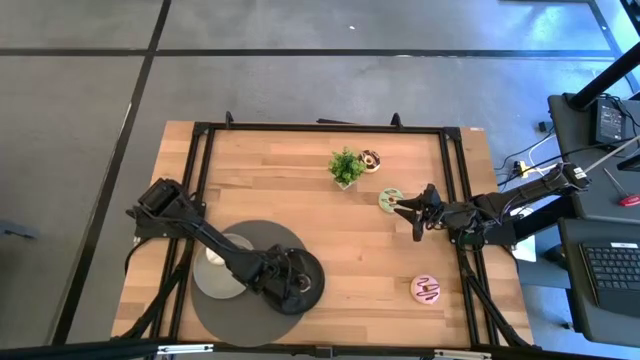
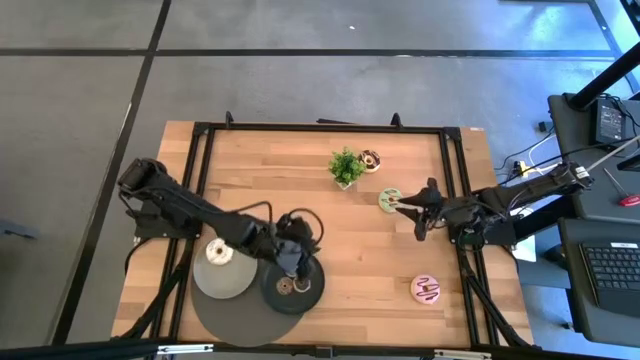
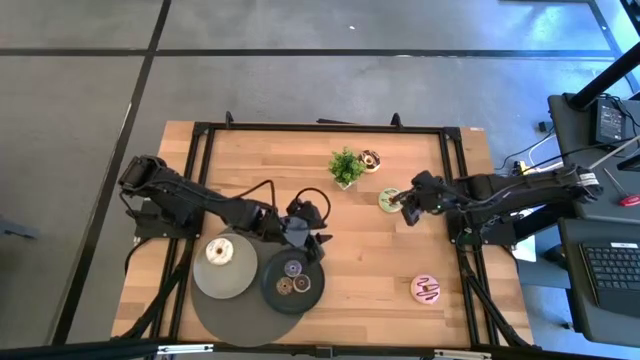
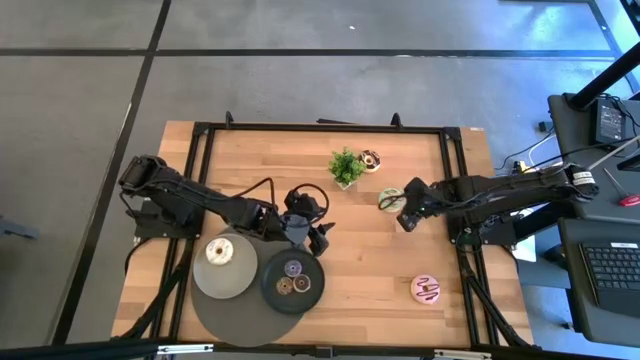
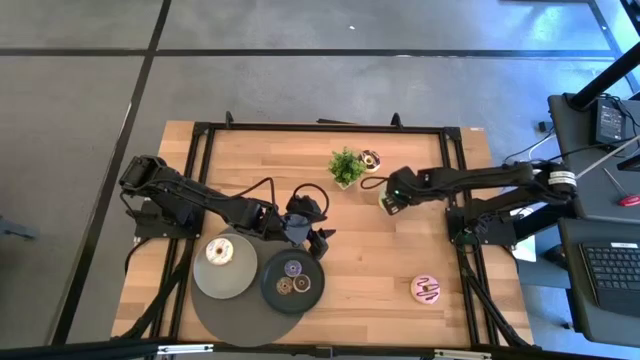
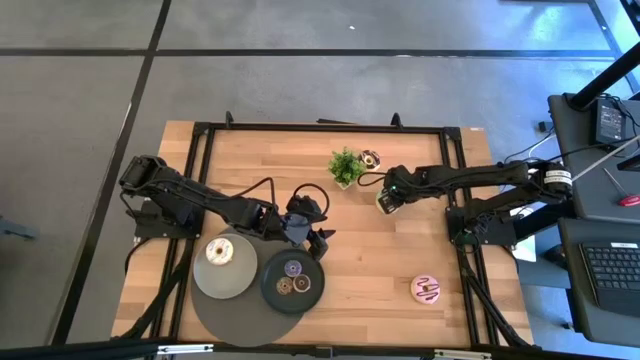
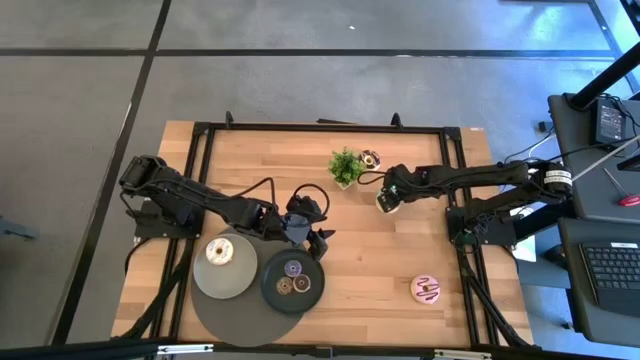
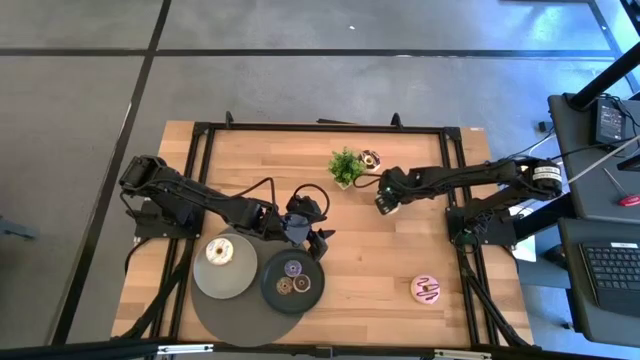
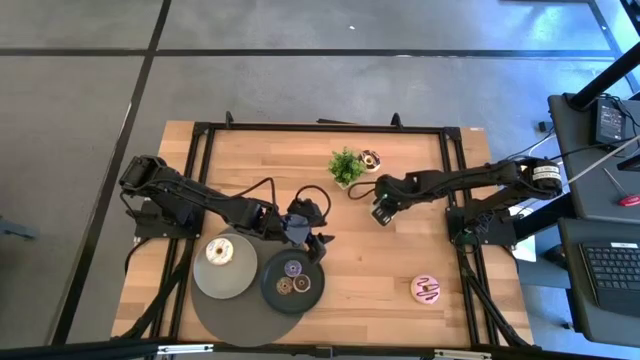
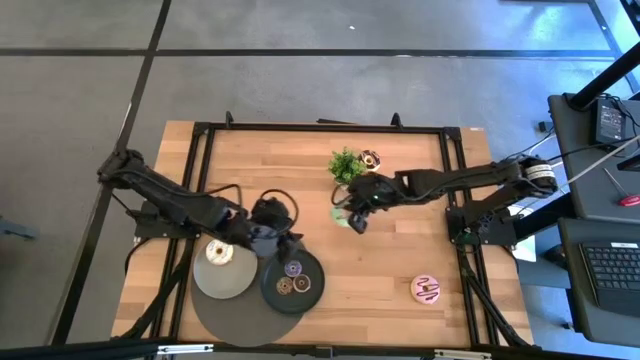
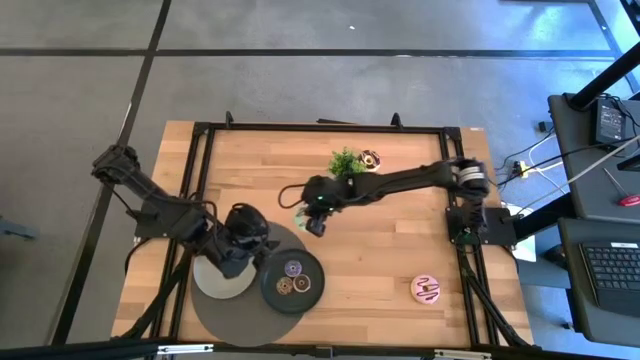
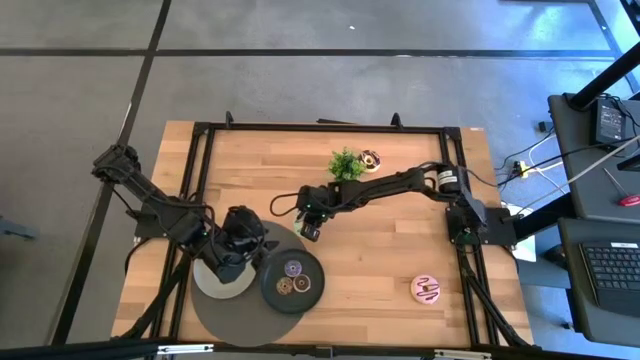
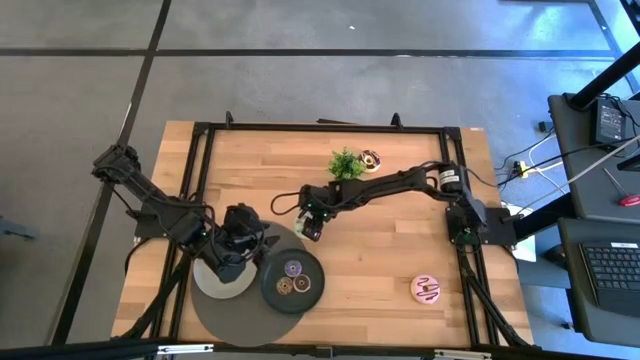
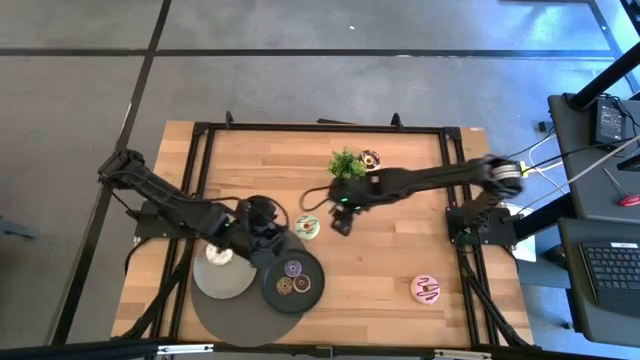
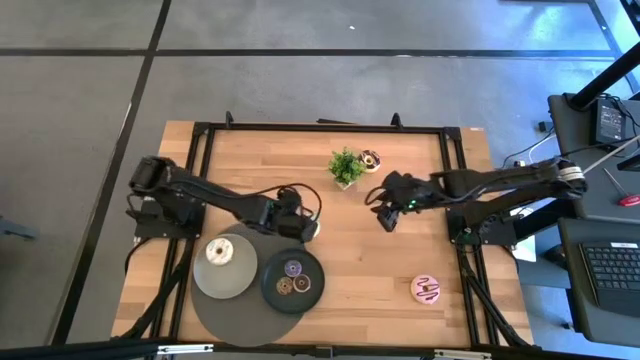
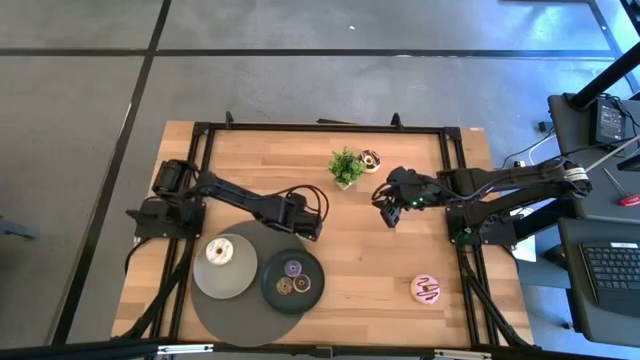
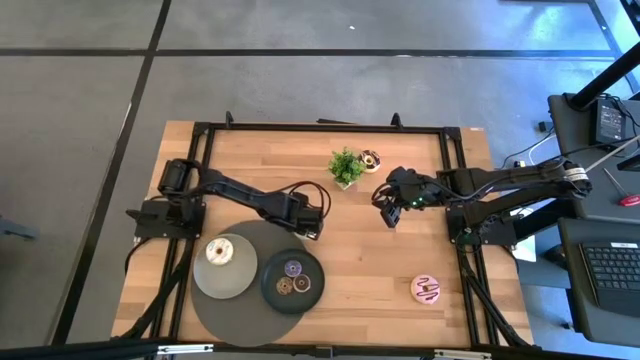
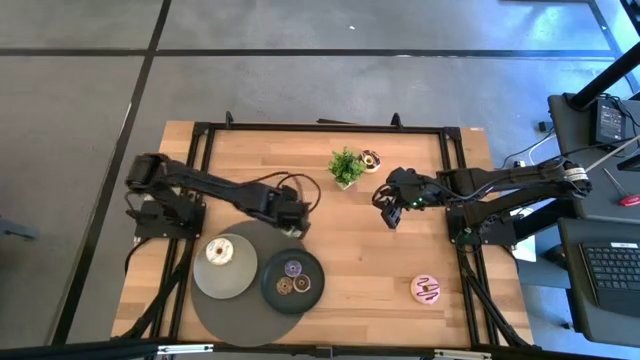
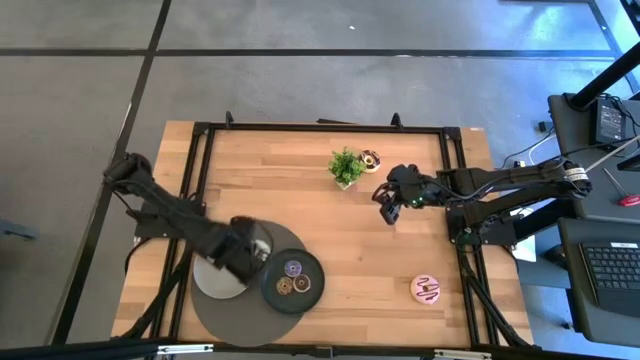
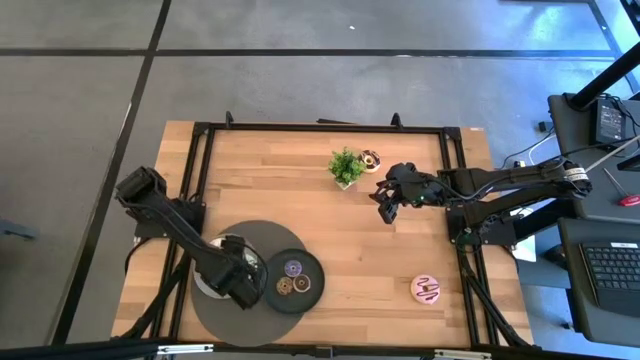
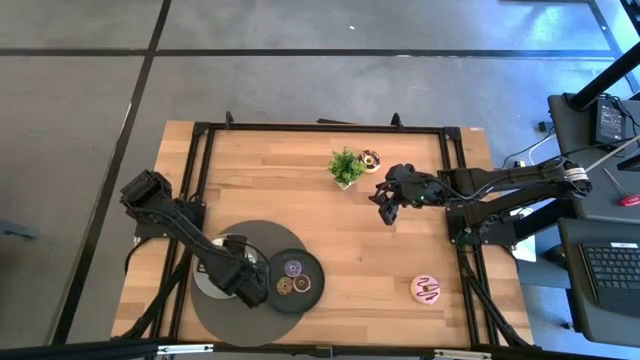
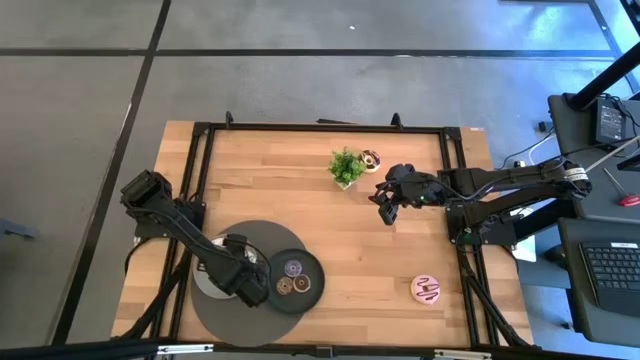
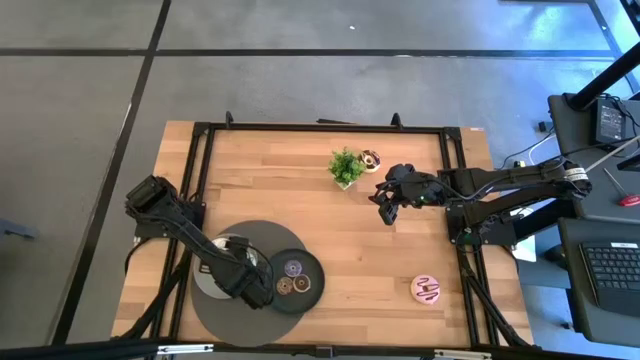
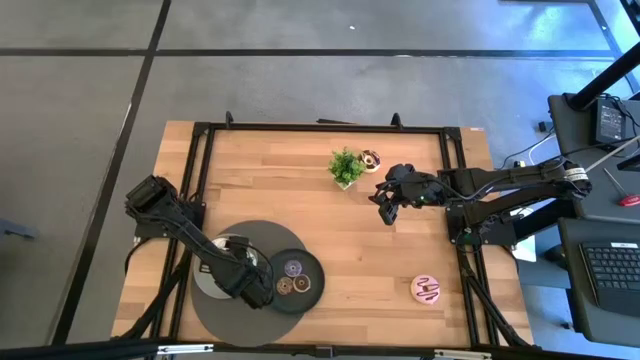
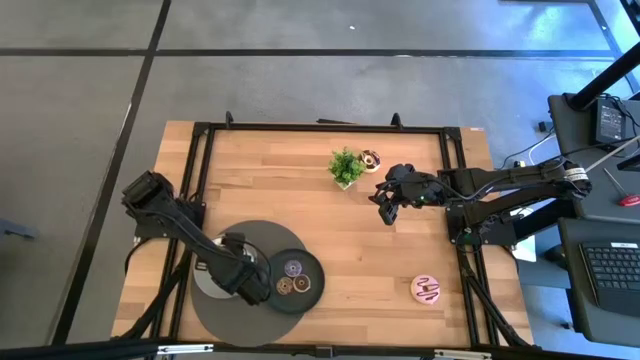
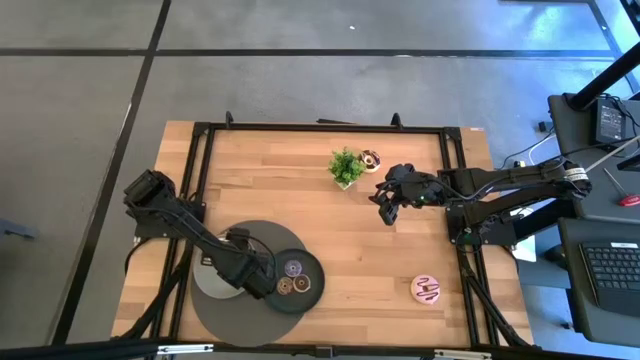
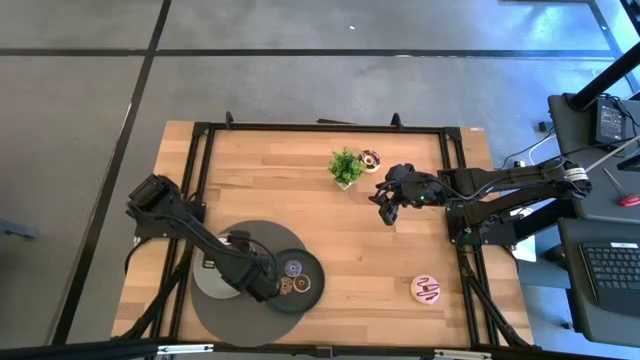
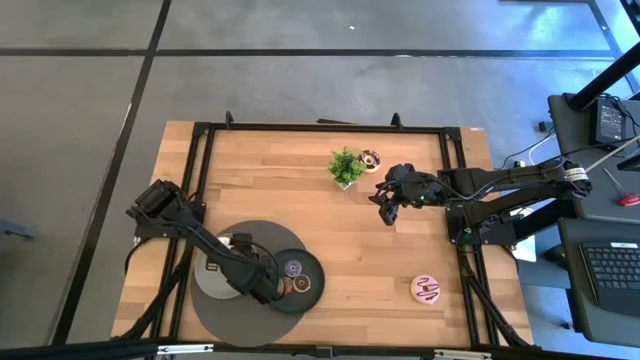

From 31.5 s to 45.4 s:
Task: Pick & Place donuts
Put the big light green donut on the gray plate

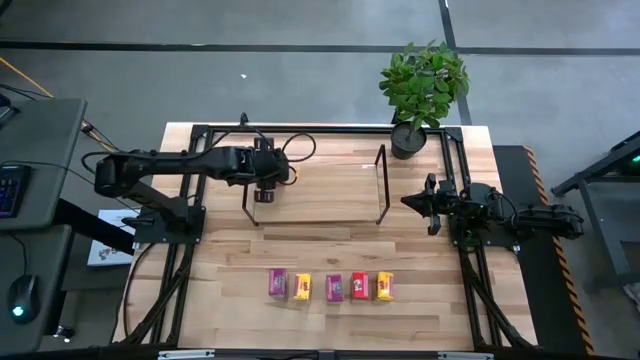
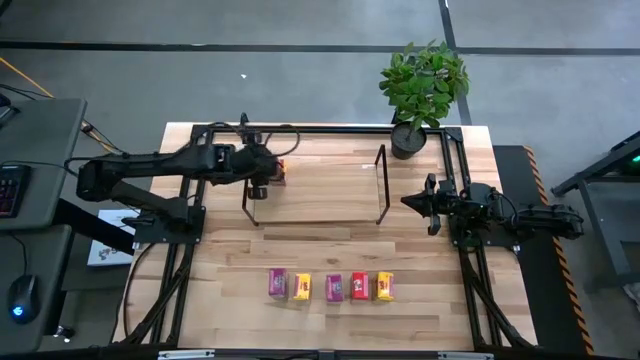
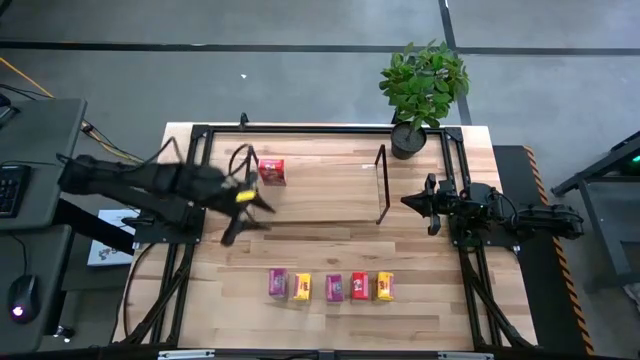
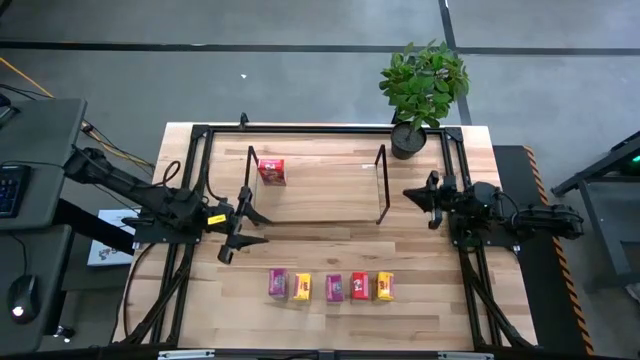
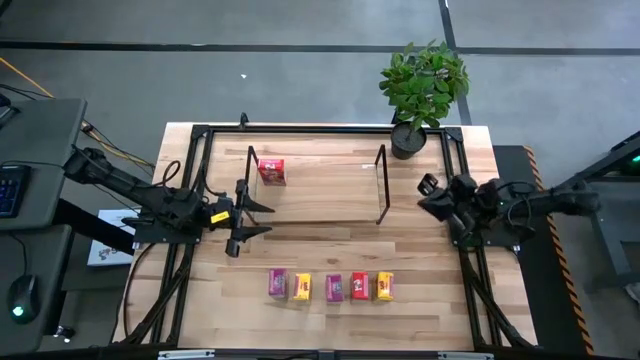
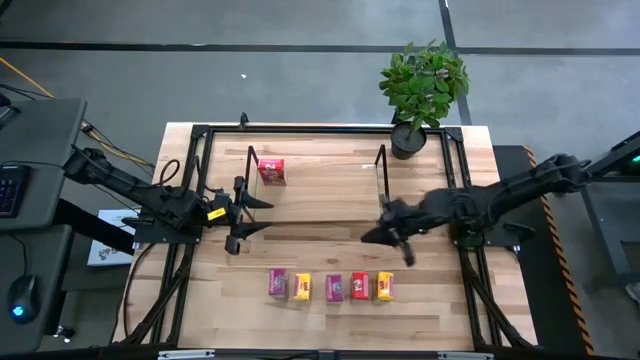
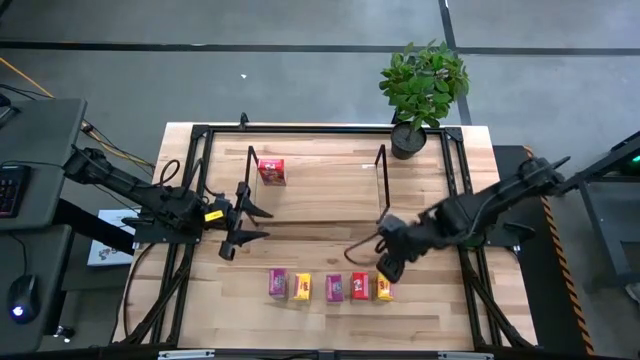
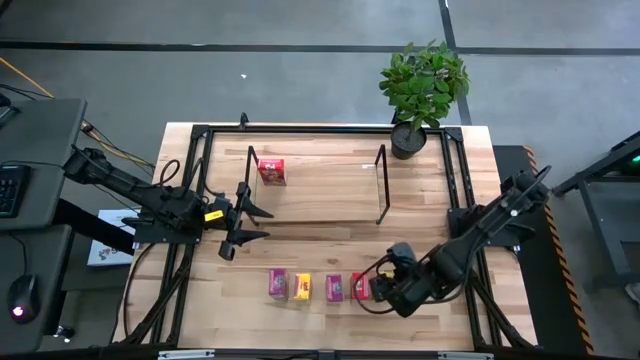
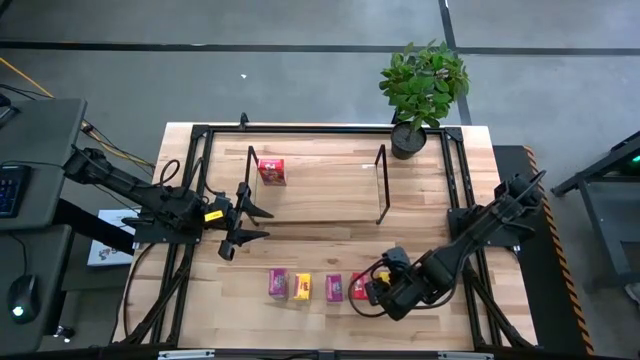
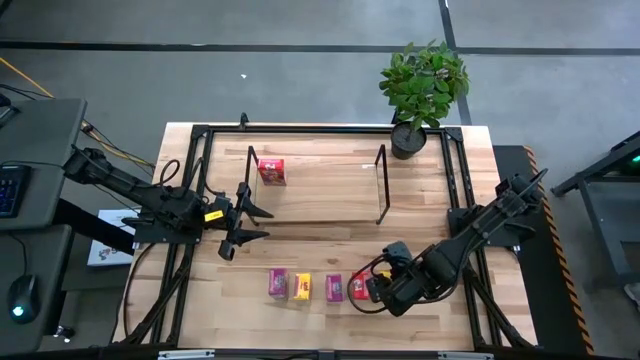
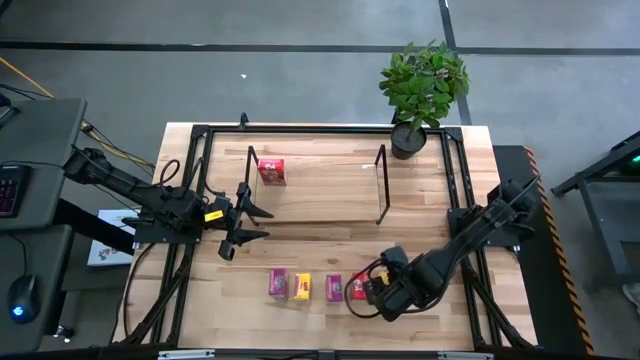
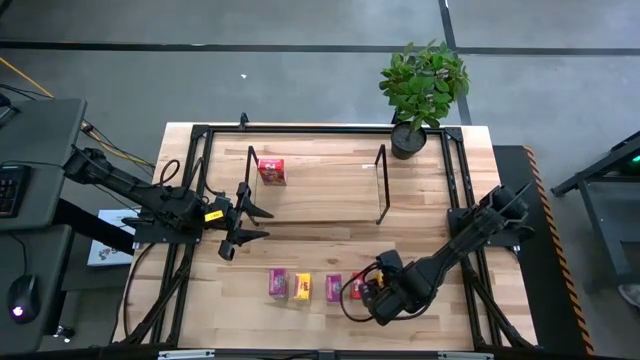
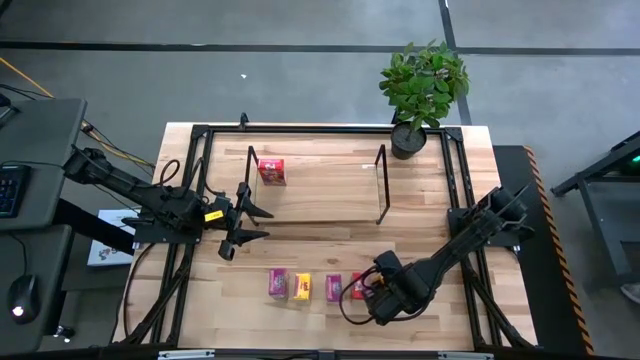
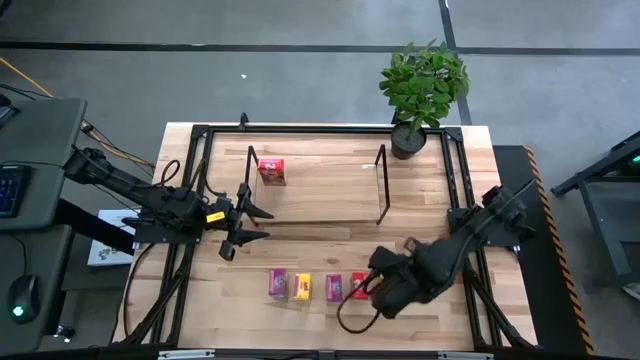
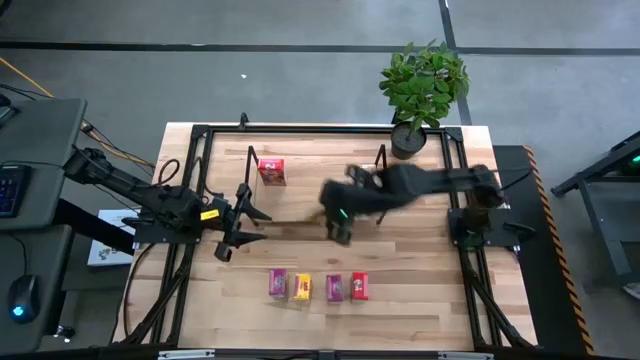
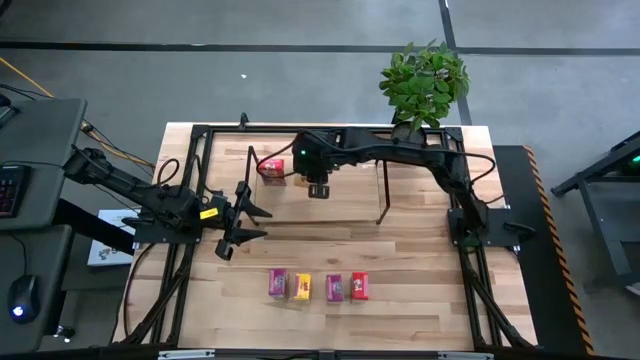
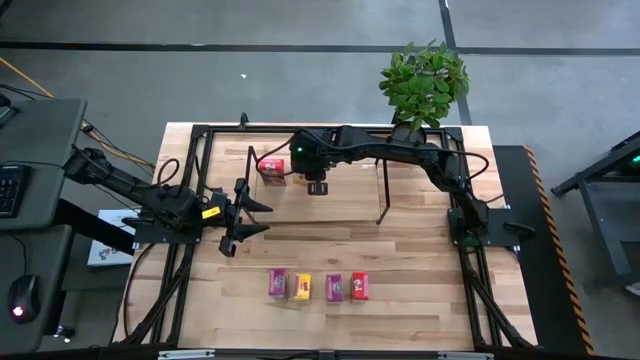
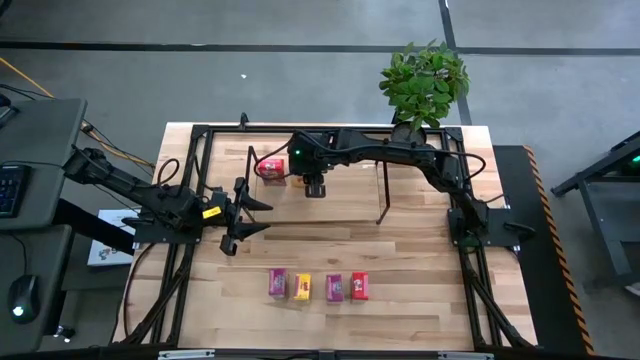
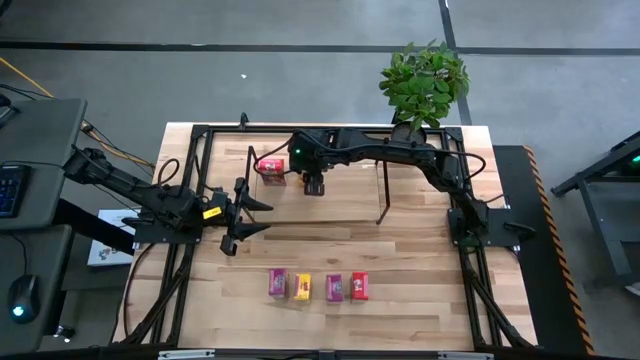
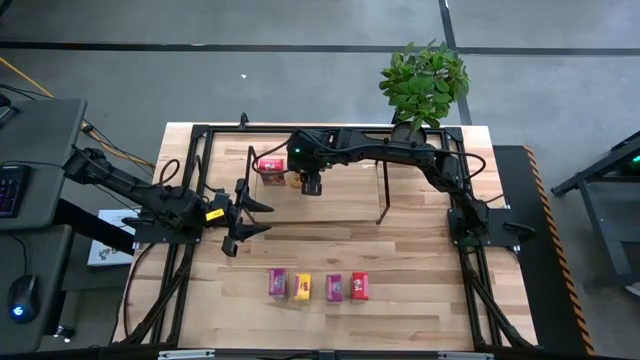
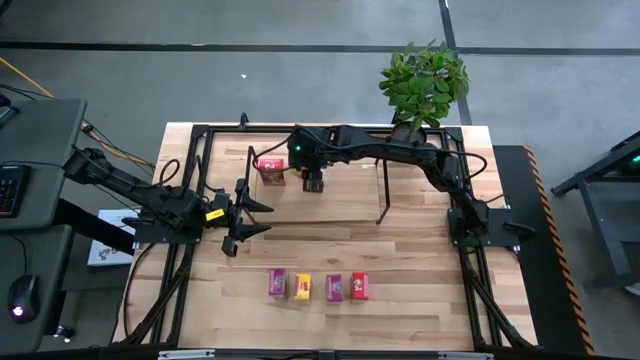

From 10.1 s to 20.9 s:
Task: Stack cereal on shelf
Put the yellow cereal box on the shelf
